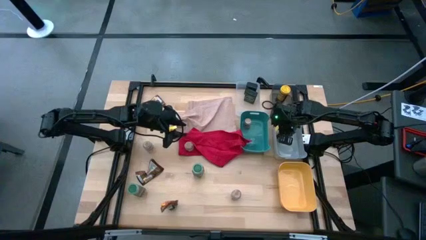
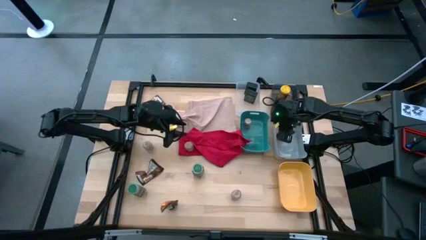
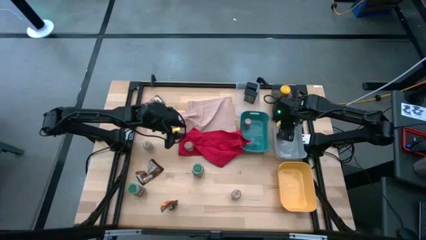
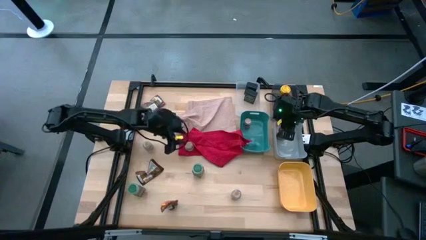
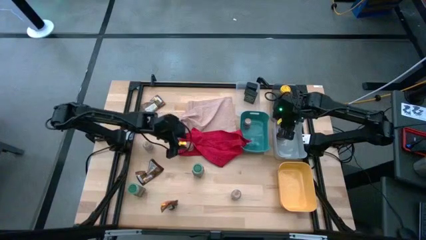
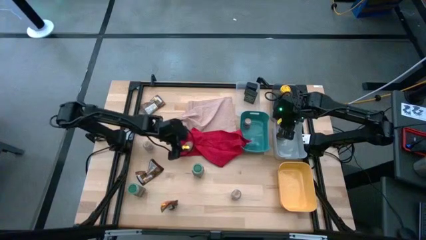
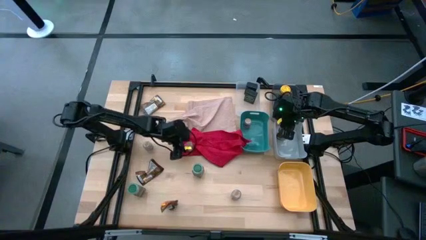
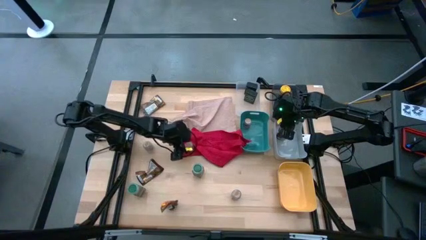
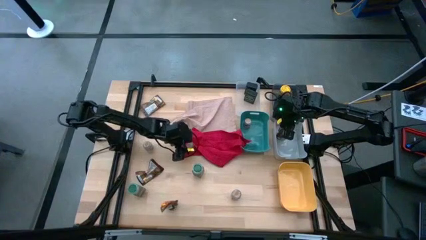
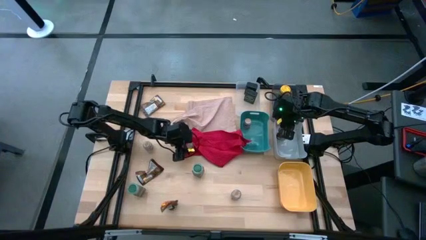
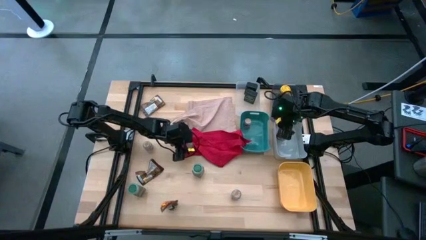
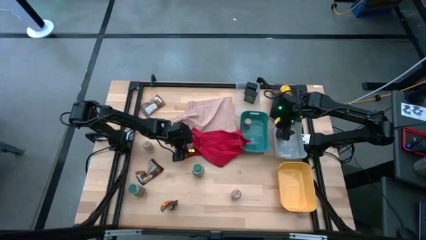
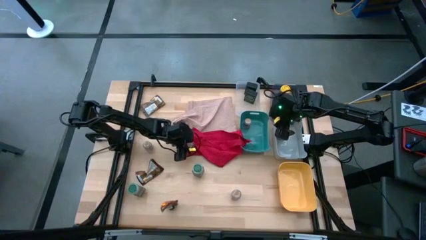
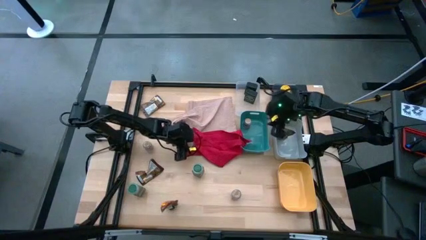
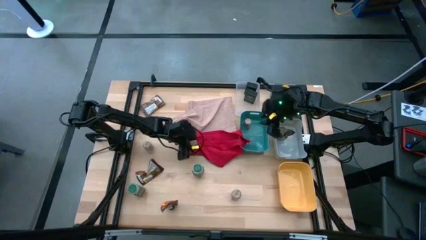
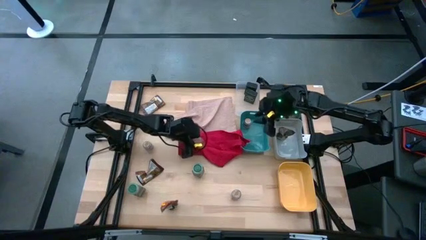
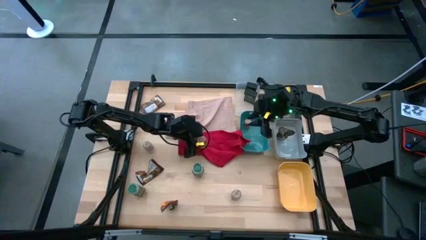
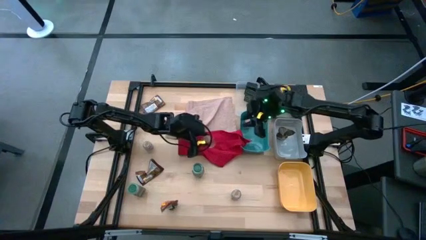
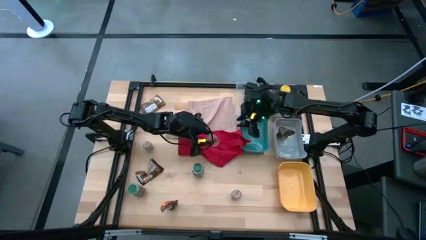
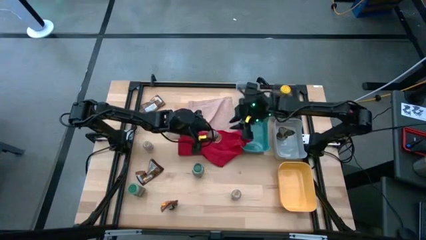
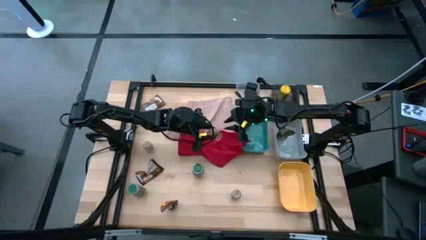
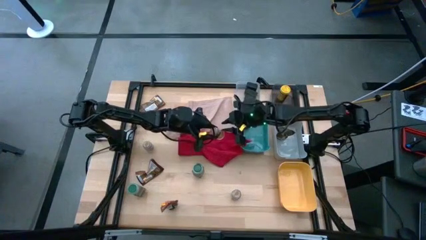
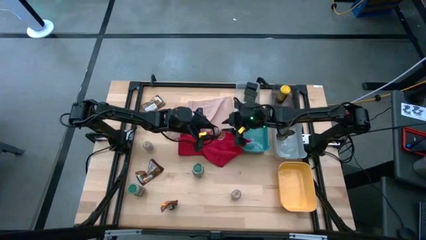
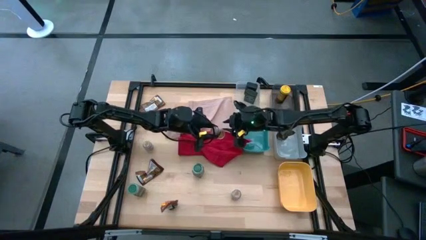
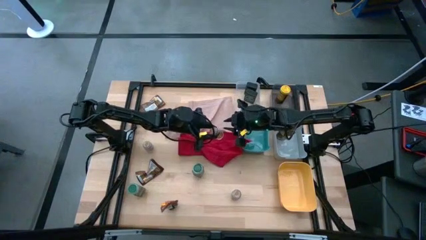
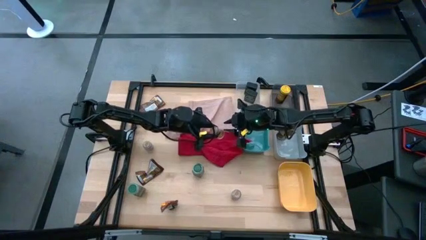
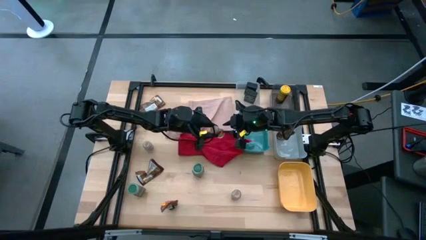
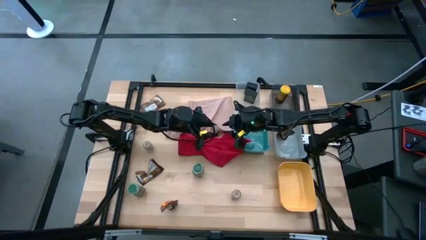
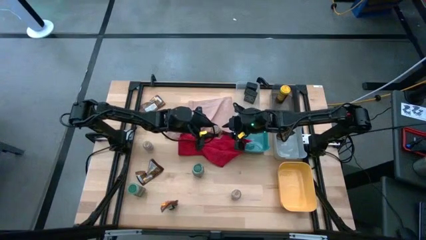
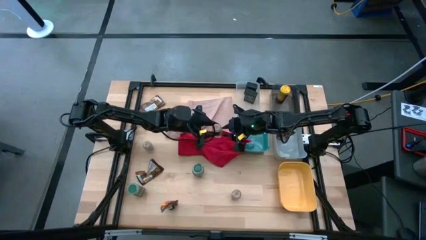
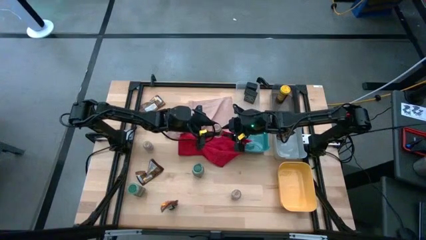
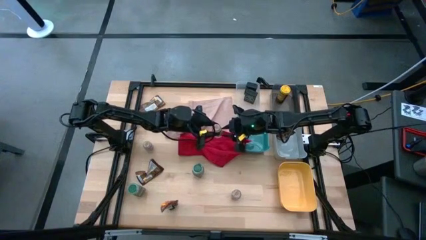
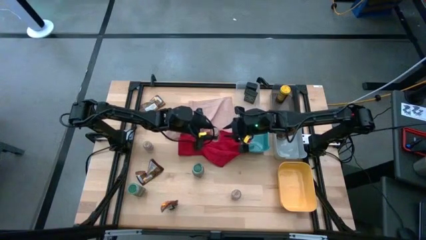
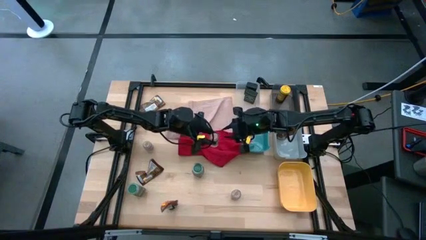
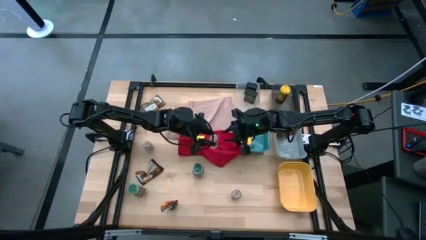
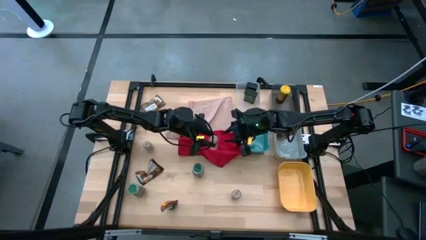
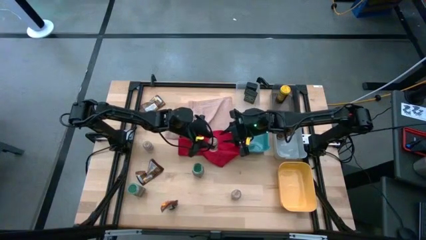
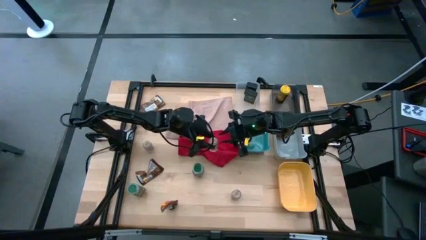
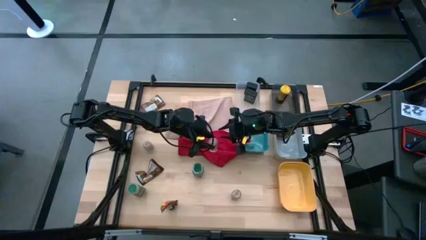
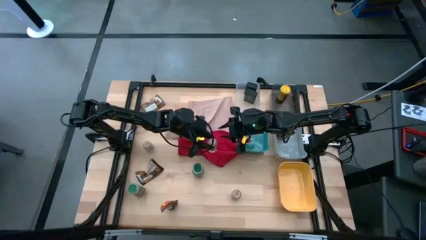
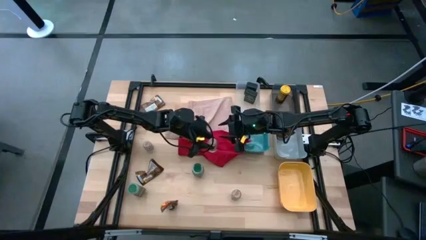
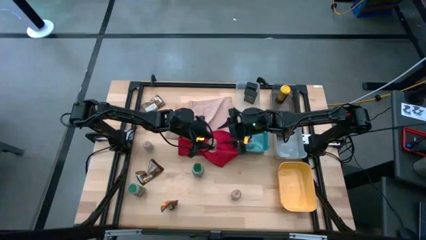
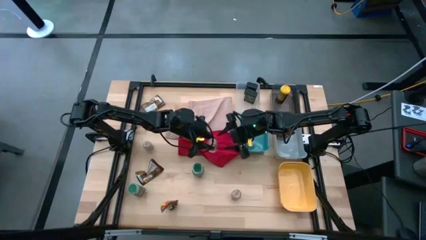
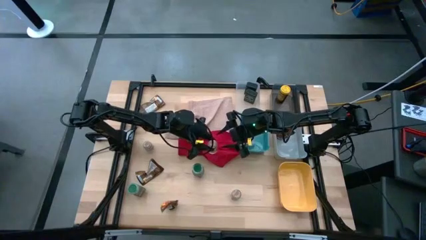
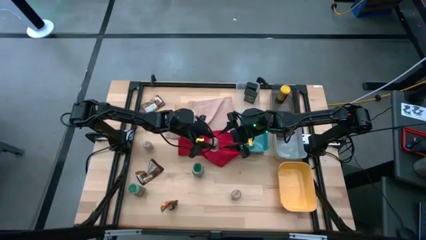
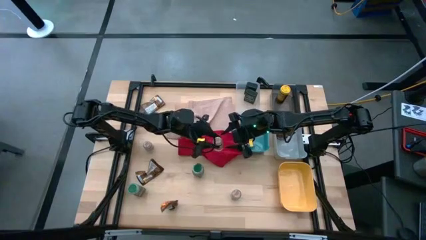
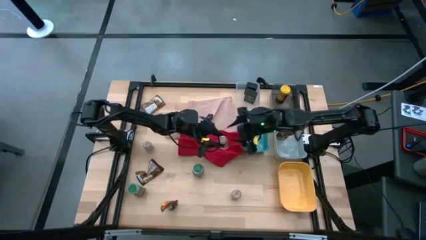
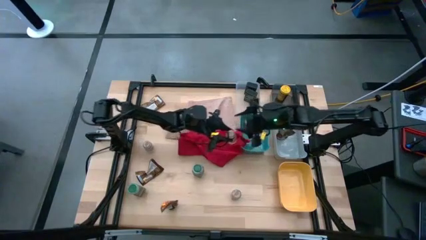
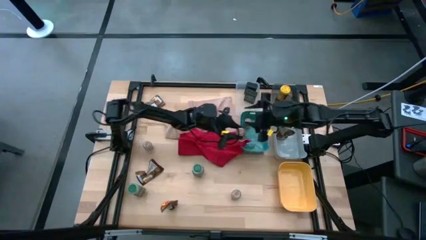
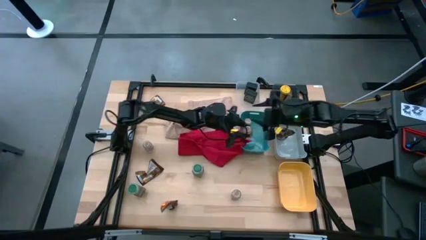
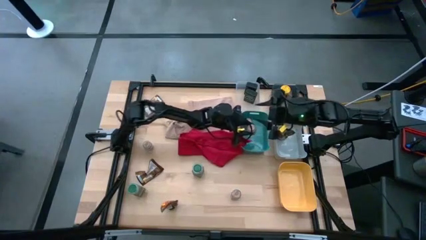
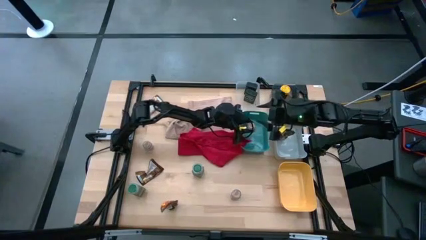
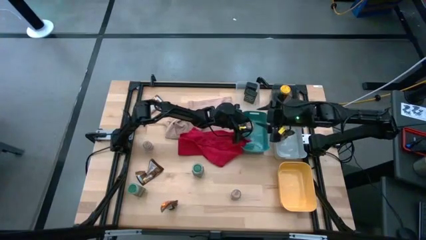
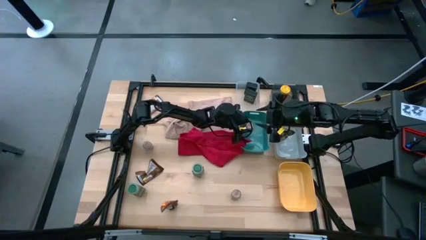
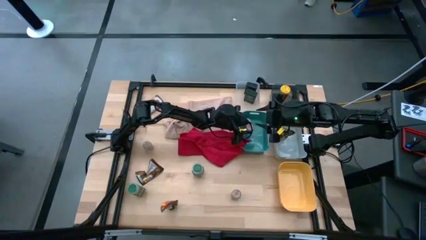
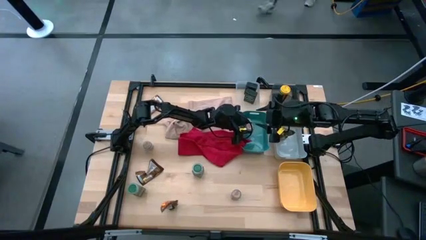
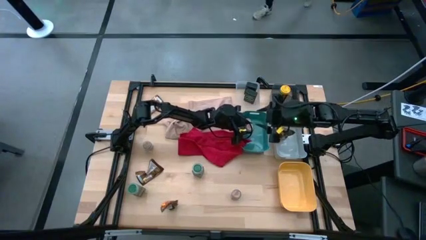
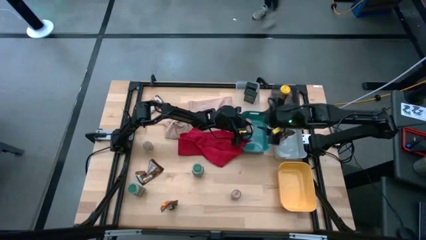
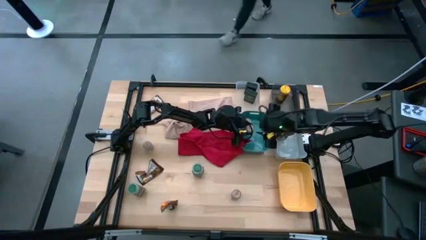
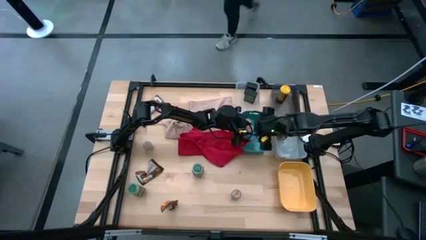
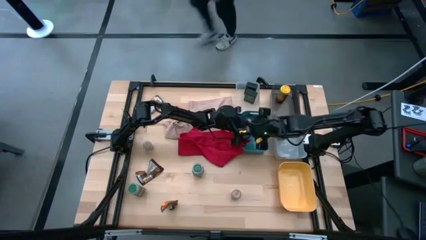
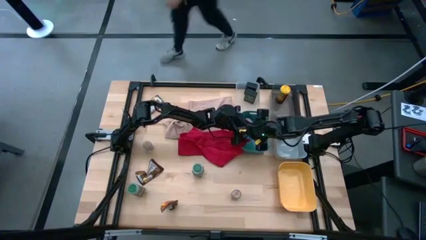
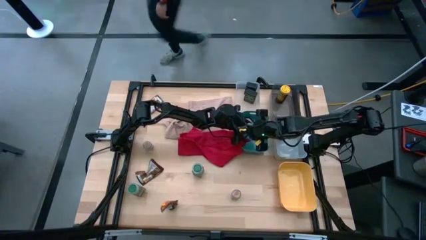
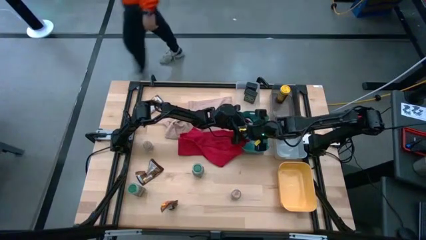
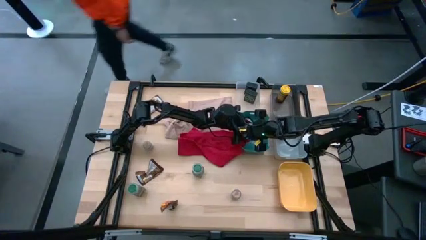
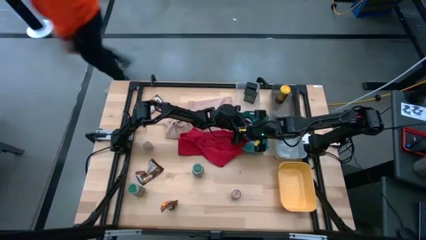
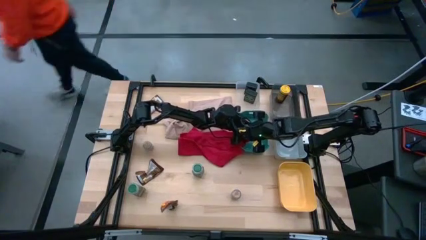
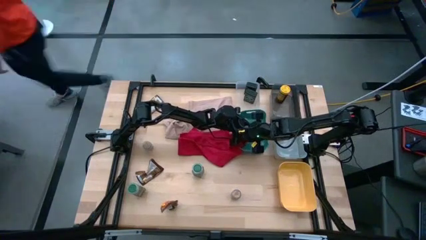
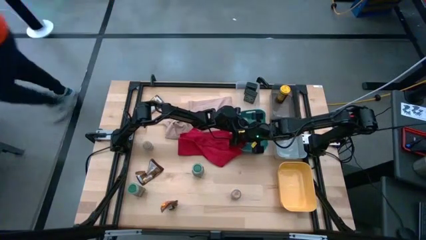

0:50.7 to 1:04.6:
Task: Sort spices by type
Put the top right transparent seasoning bottle into the blue bin

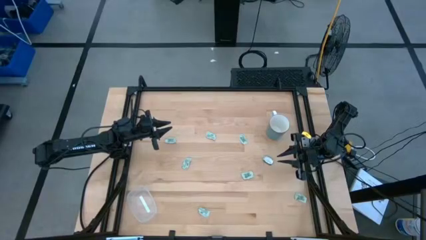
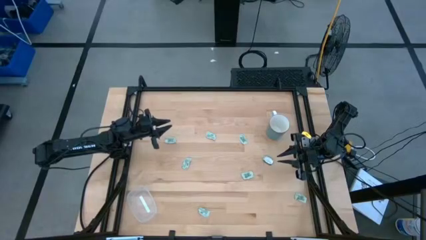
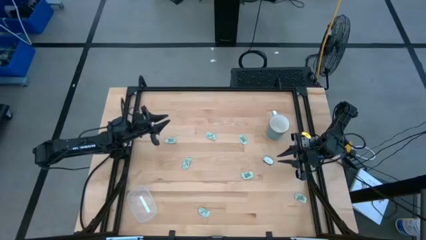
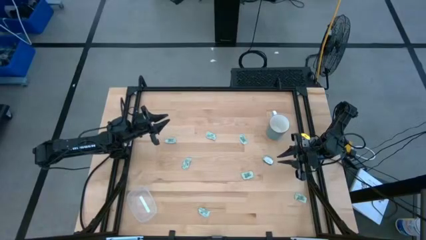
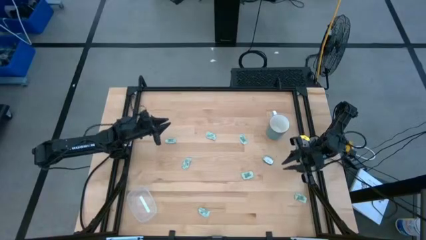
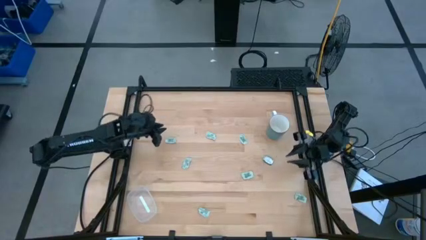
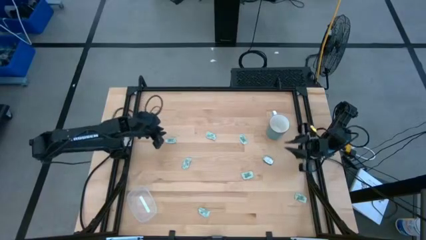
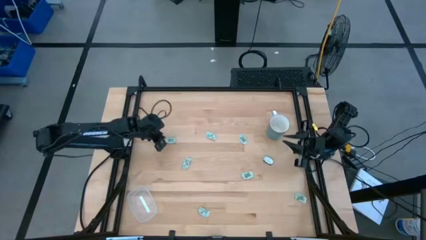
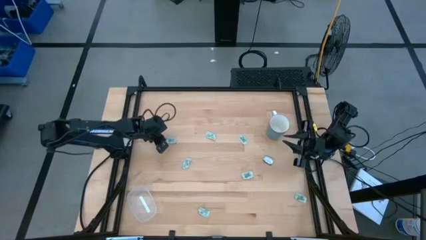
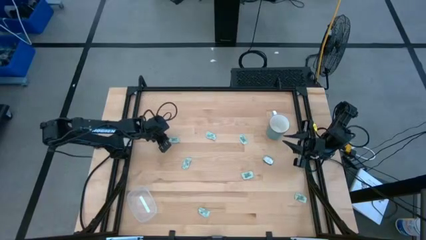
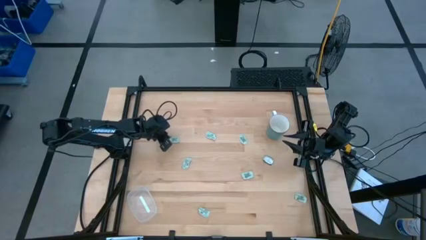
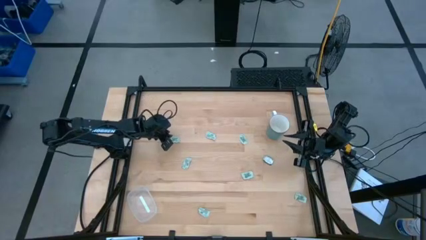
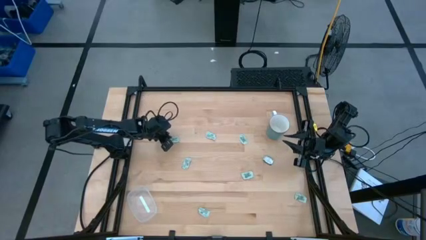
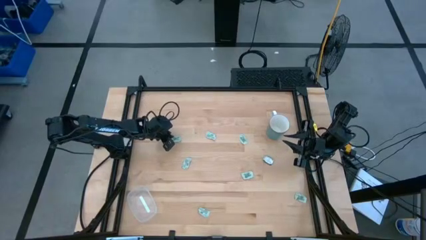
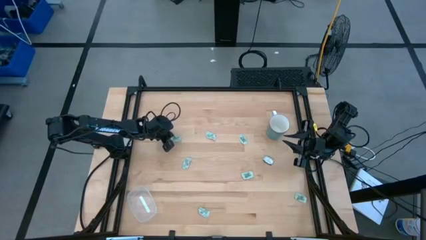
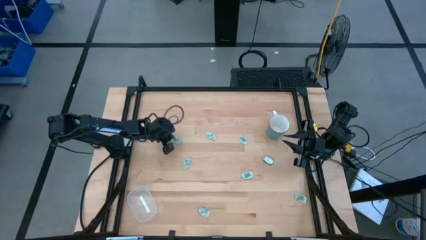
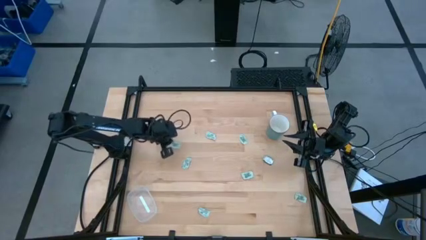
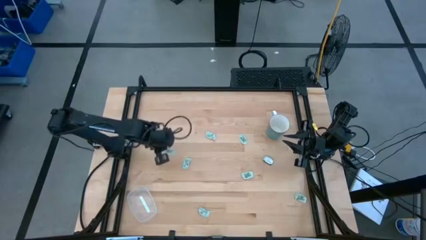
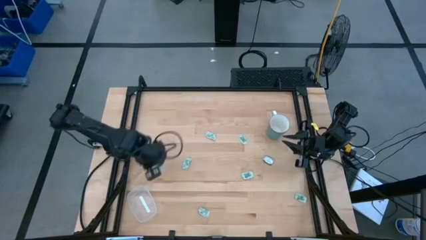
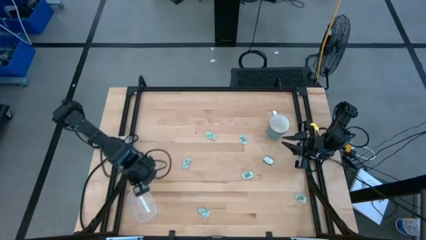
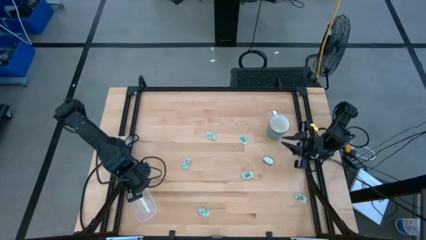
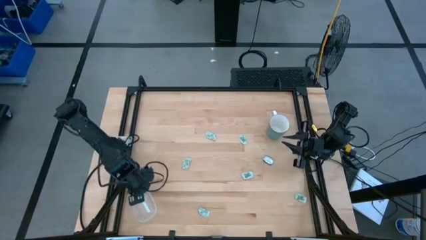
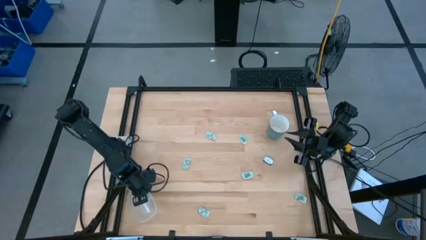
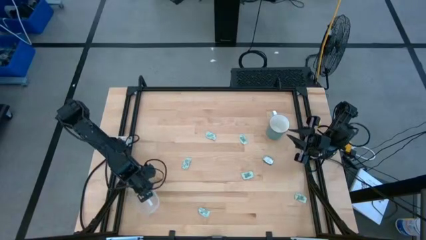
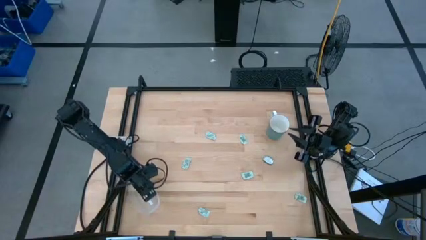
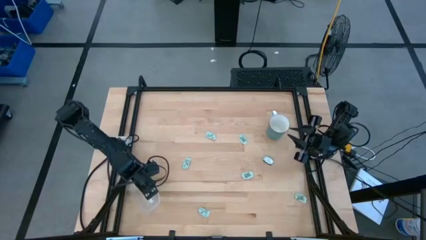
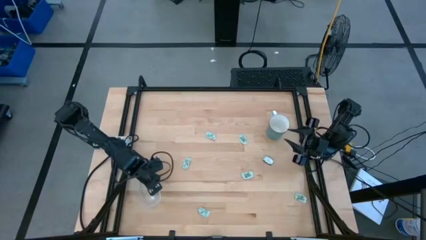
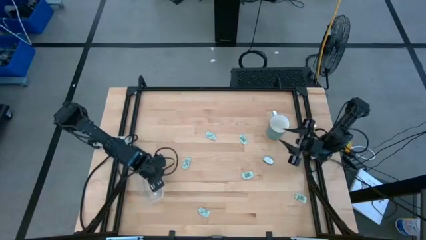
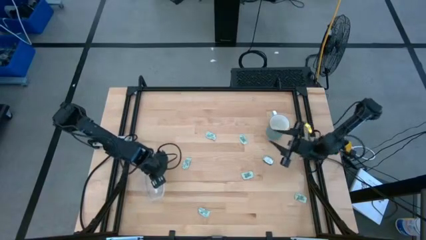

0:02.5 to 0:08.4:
Task: Pick and place Stevia / Truvia into bins
Put the stevia packet into the transparent container
